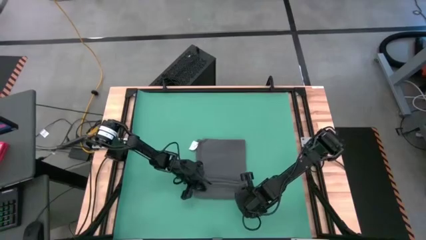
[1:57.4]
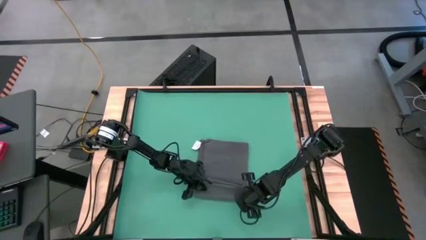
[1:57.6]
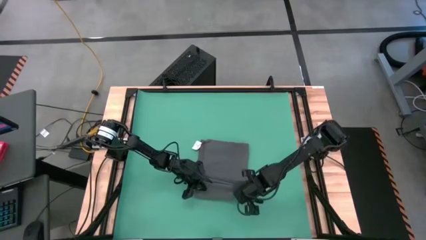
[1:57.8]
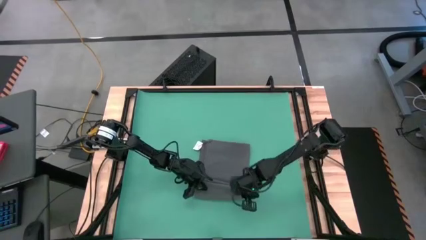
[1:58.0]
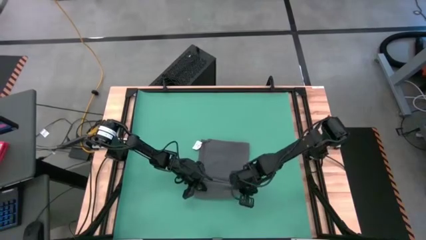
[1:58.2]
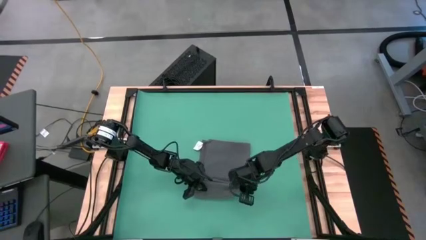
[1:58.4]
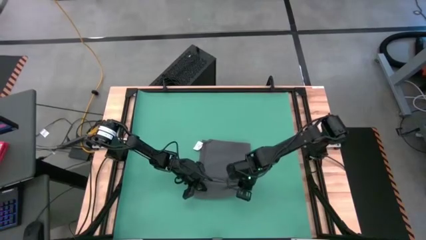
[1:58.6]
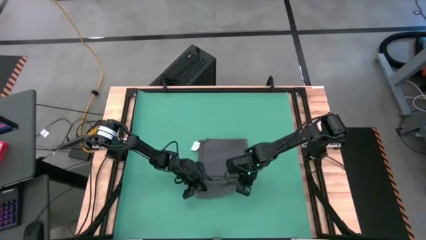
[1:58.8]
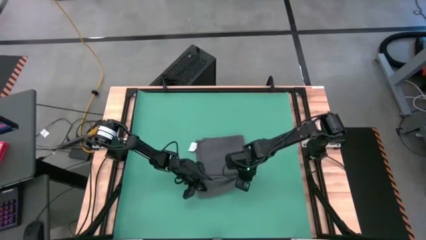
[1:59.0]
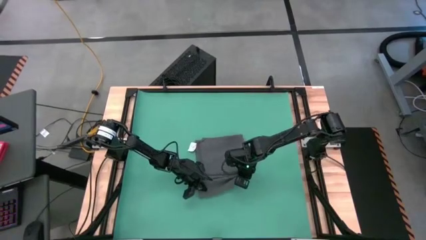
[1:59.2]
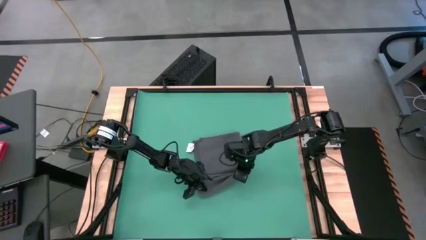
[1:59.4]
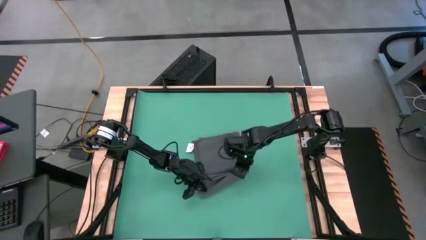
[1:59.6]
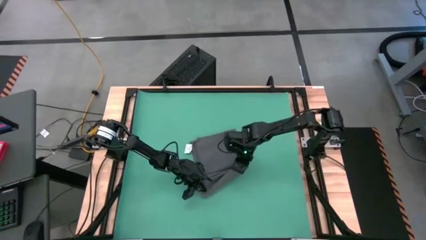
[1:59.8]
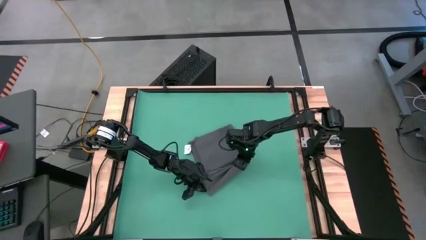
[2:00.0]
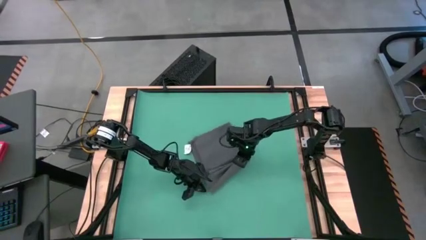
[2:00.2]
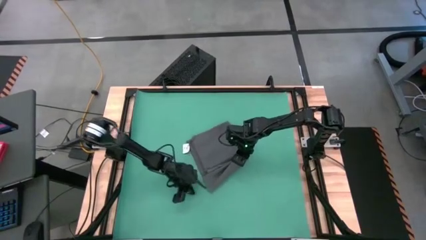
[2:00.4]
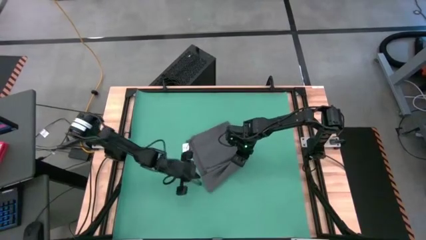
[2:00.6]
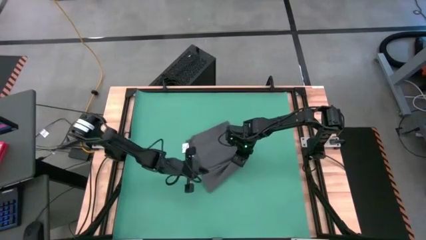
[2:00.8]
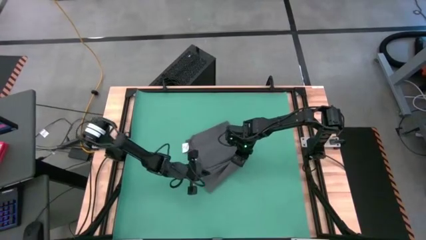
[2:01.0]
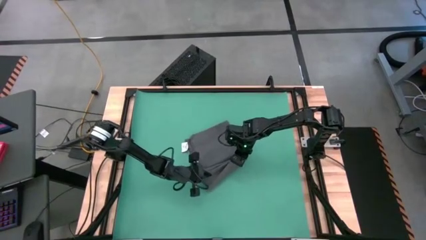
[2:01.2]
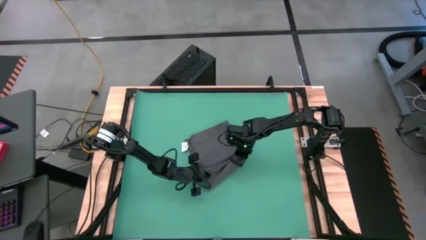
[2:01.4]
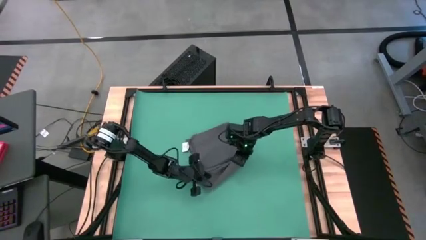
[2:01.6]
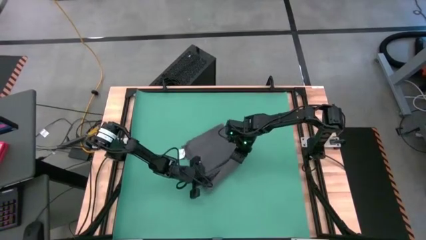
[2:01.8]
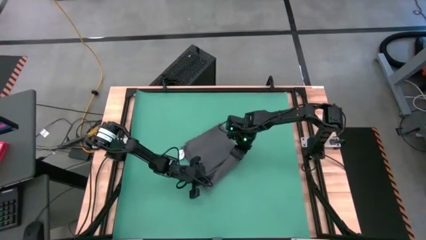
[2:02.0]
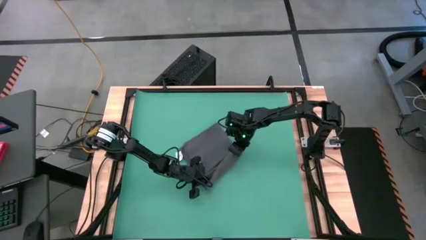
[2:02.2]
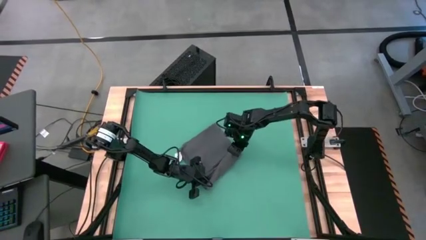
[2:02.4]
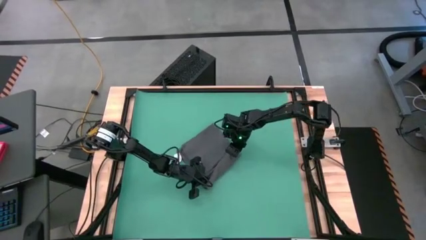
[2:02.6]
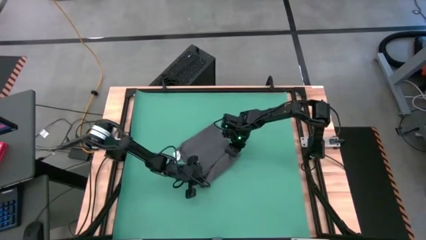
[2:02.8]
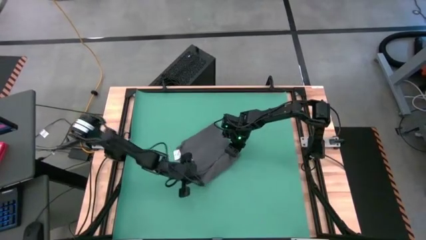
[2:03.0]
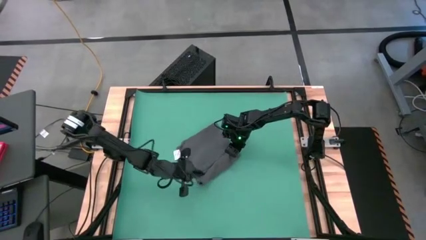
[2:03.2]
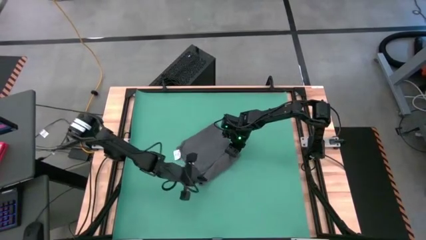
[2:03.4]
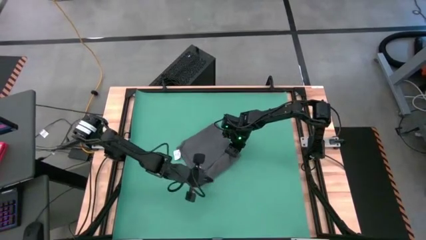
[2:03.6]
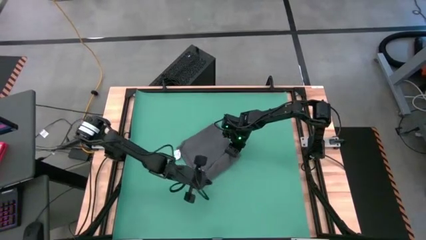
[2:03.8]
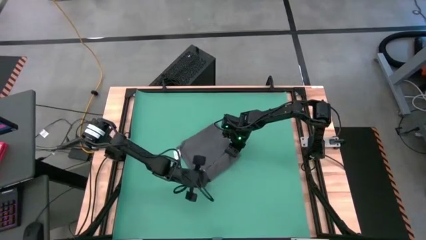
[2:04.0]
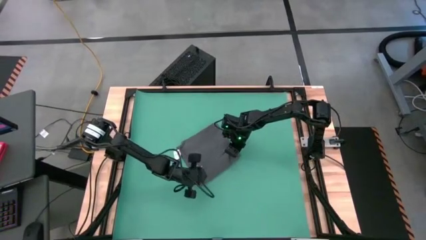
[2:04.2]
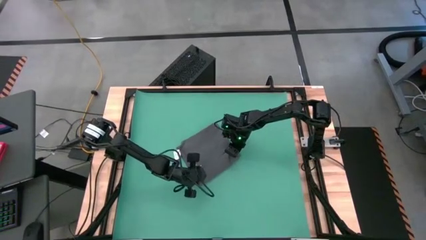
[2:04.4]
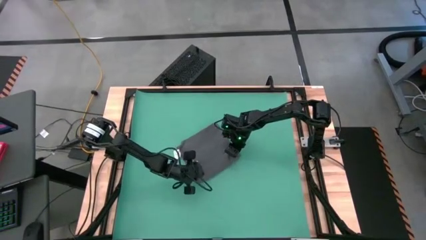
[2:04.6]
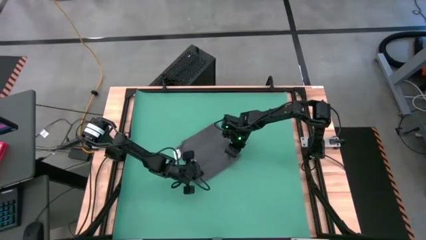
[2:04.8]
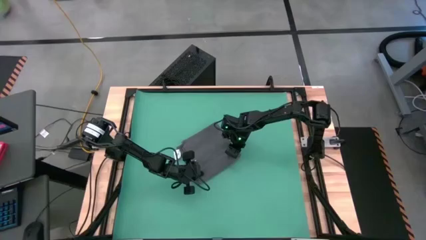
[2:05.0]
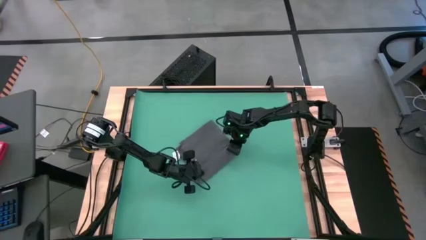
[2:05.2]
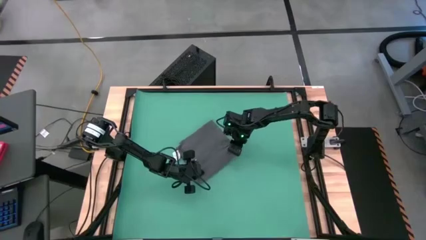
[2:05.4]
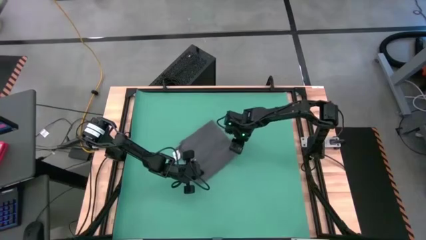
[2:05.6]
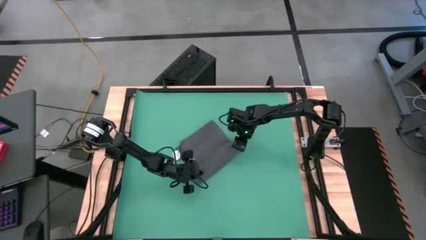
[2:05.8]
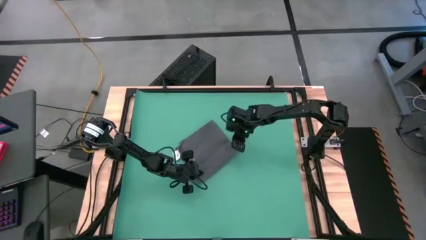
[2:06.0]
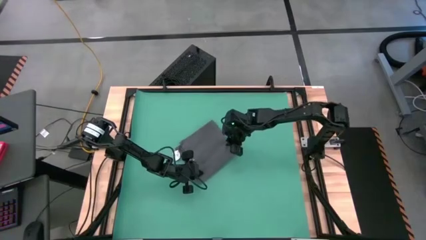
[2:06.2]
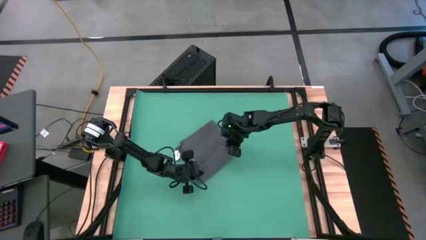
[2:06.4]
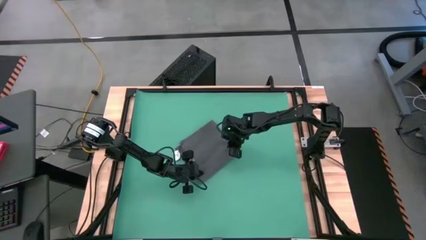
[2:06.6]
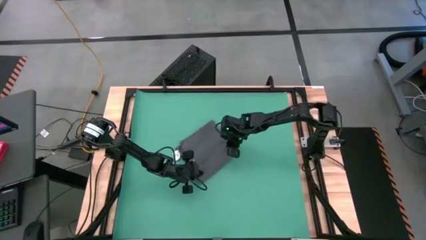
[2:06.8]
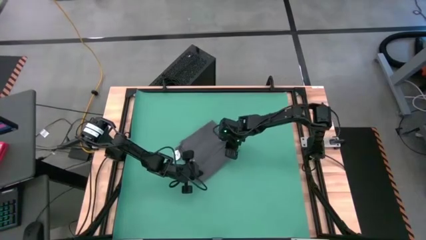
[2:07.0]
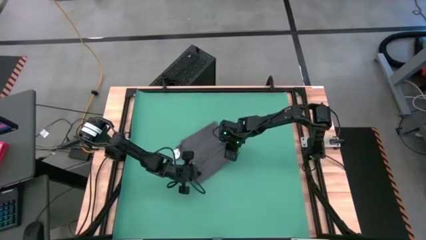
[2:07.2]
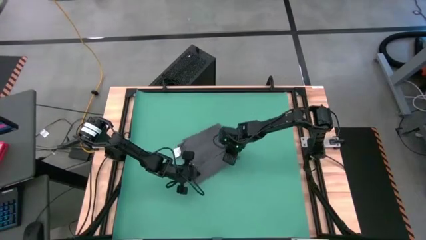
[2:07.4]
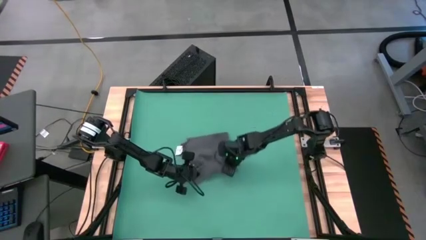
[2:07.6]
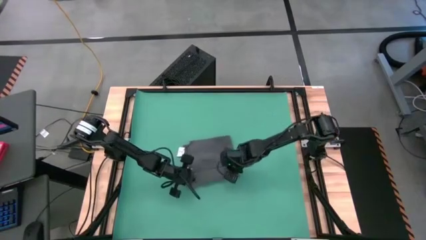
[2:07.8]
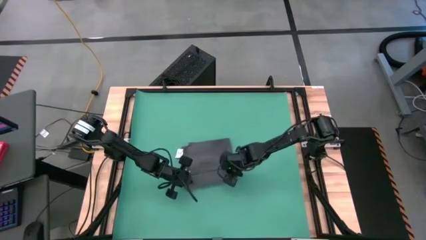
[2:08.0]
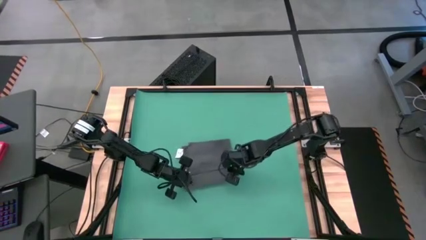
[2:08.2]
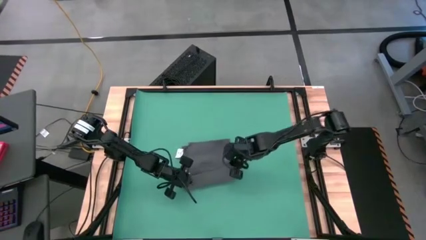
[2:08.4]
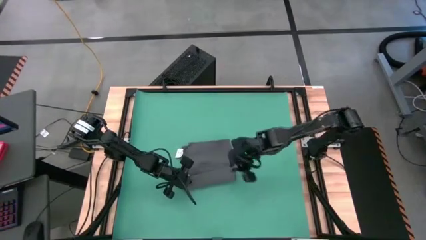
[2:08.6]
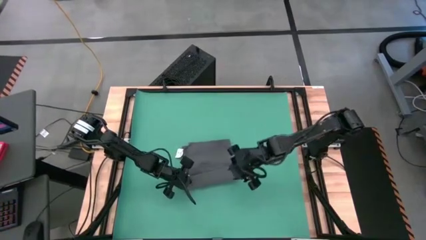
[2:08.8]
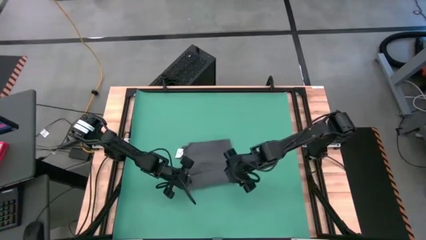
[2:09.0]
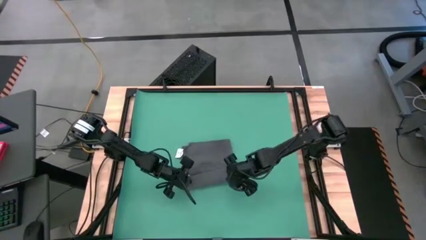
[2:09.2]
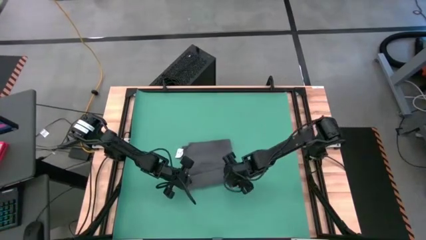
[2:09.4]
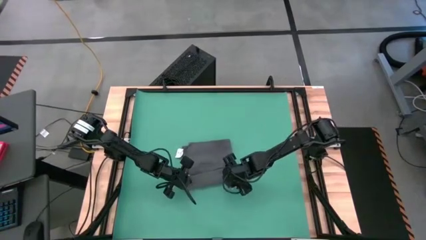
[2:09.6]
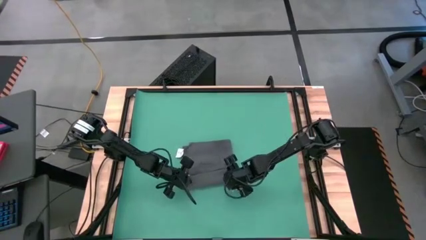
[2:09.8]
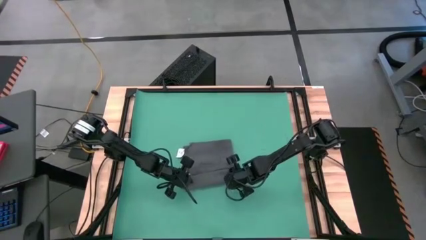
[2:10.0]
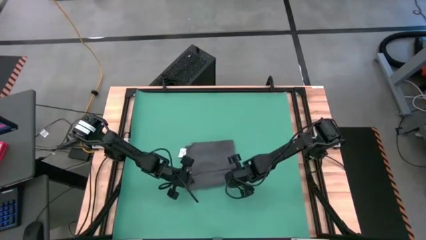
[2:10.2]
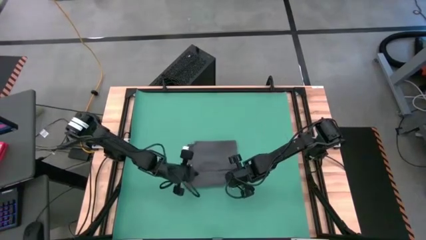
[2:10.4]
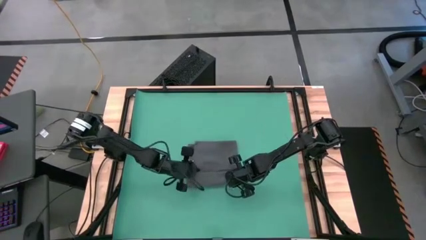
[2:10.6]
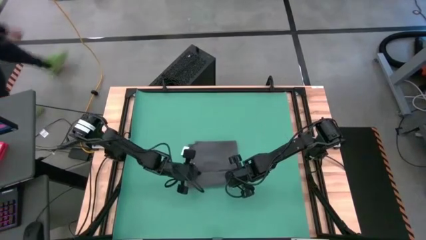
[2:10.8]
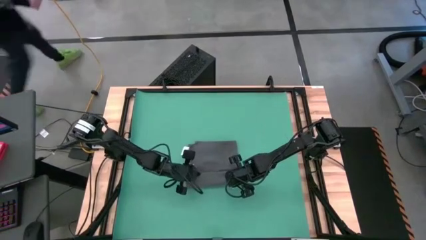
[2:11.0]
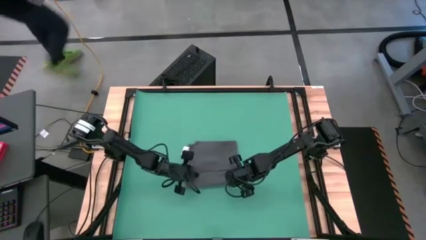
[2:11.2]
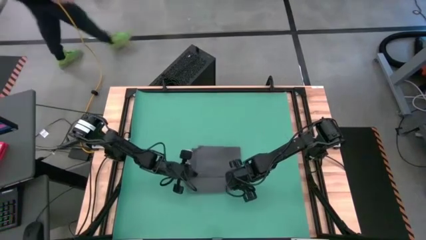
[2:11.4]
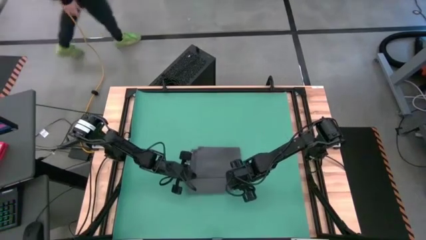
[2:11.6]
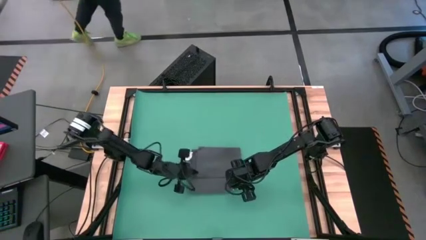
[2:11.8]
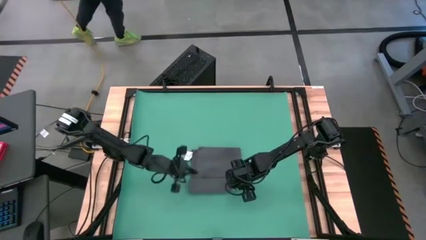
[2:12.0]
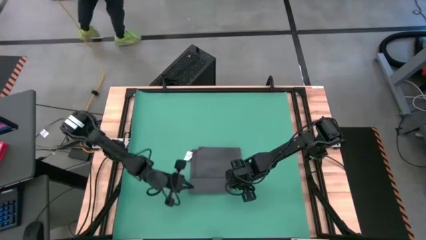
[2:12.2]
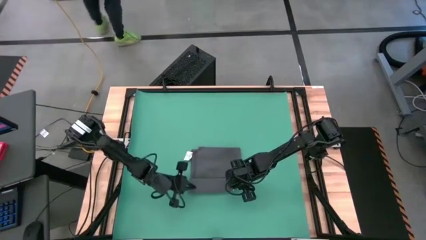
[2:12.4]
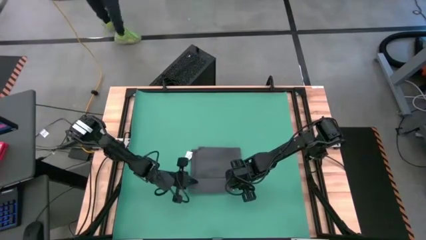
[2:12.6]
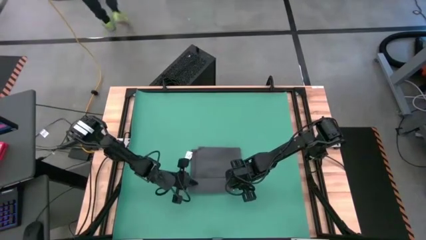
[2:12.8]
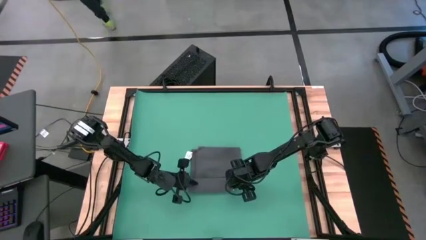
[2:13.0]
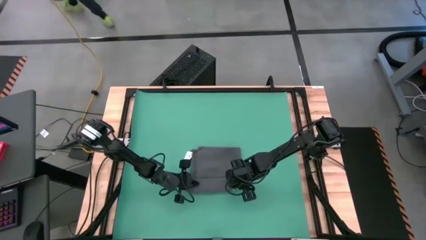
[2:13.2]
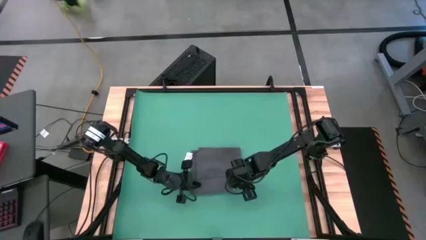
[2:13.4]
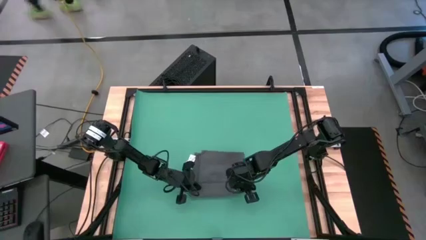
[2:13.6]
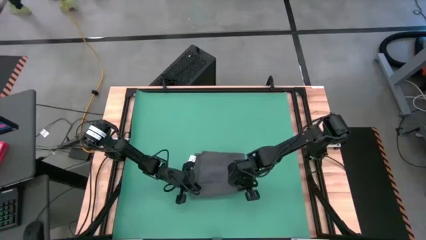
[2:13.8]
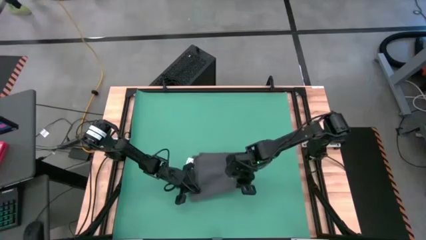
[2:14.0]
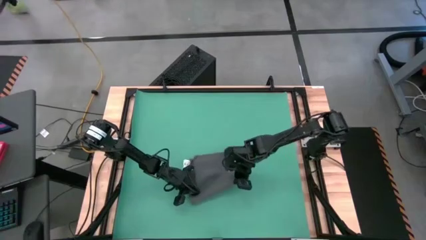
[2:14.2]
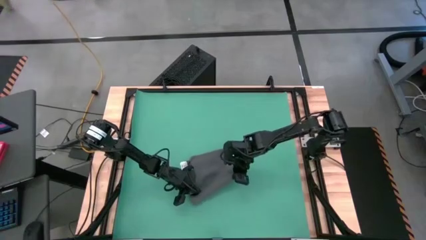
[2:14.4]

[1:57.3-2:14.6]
Task: Roll towel
Roll the gray towel on the table
